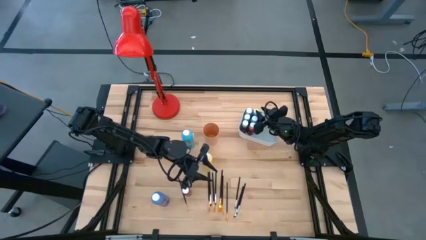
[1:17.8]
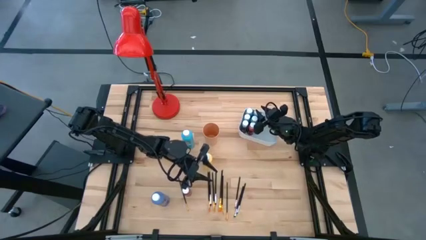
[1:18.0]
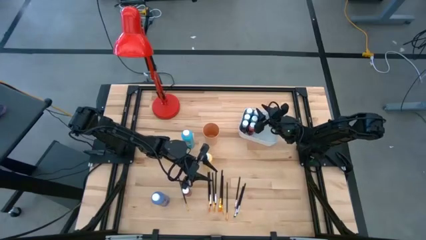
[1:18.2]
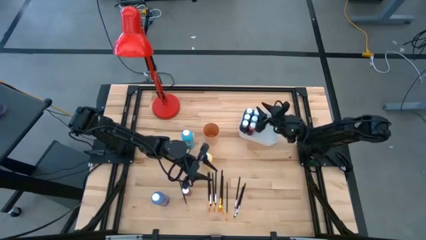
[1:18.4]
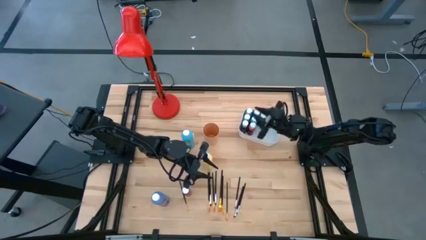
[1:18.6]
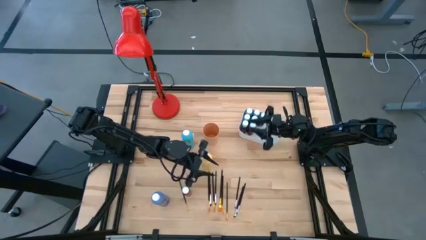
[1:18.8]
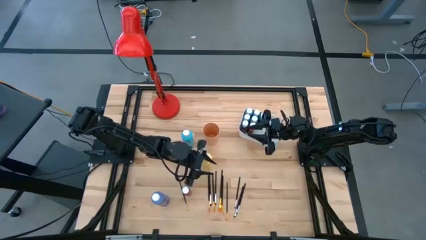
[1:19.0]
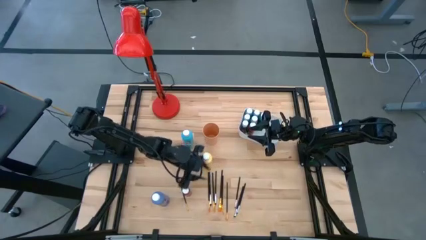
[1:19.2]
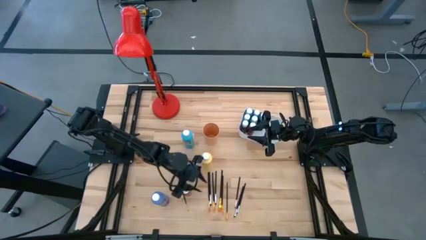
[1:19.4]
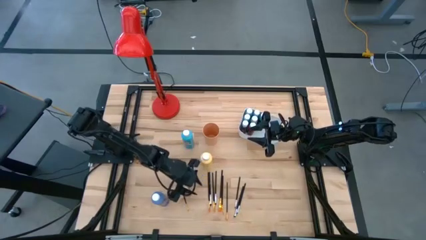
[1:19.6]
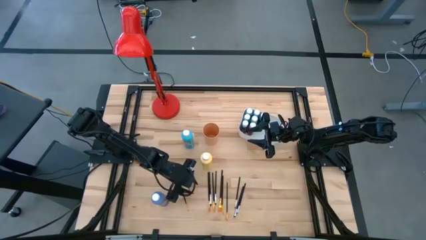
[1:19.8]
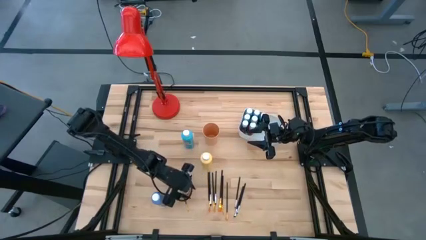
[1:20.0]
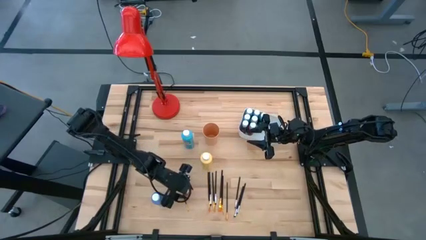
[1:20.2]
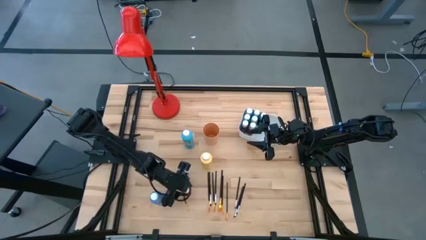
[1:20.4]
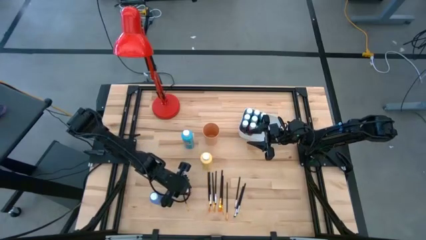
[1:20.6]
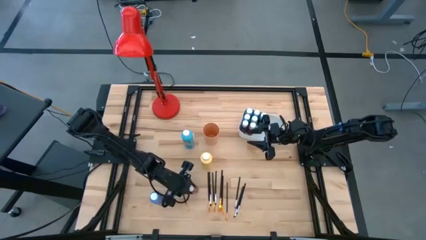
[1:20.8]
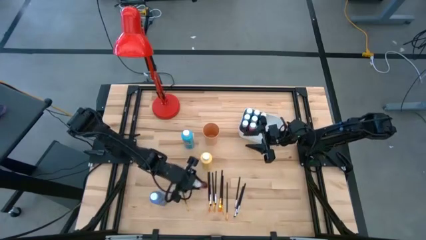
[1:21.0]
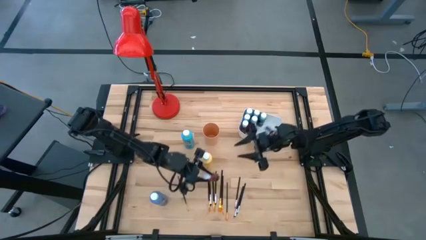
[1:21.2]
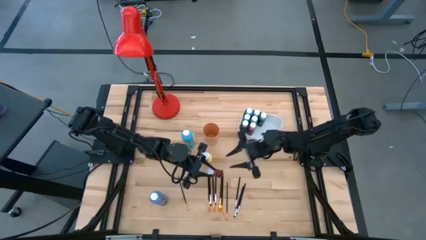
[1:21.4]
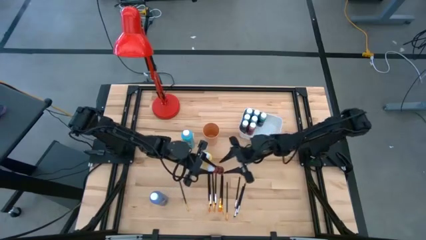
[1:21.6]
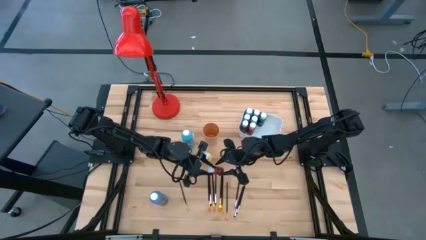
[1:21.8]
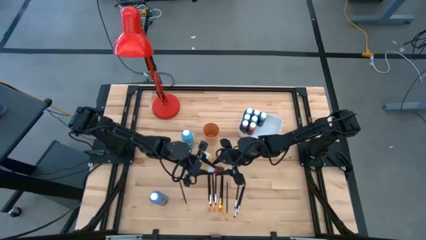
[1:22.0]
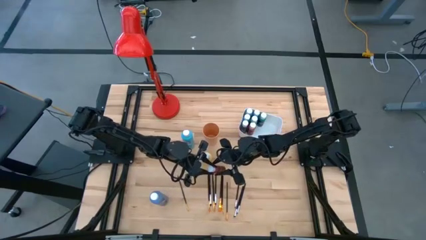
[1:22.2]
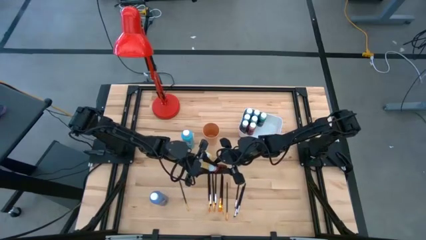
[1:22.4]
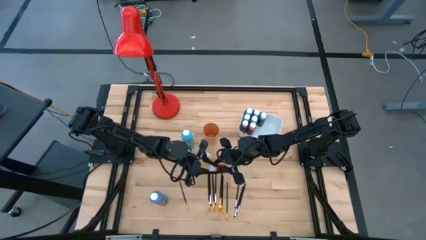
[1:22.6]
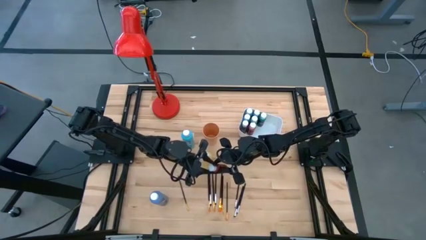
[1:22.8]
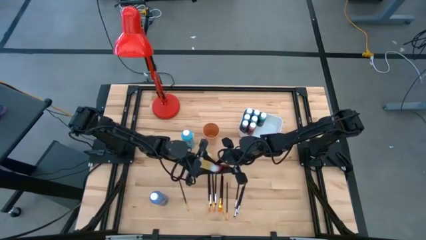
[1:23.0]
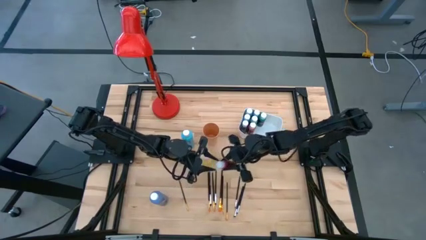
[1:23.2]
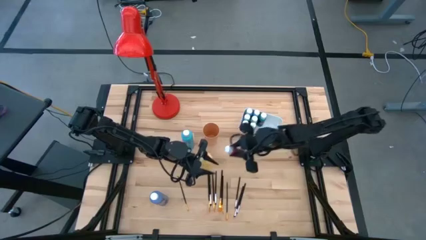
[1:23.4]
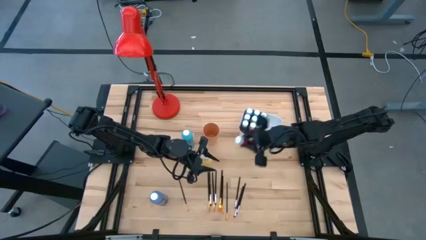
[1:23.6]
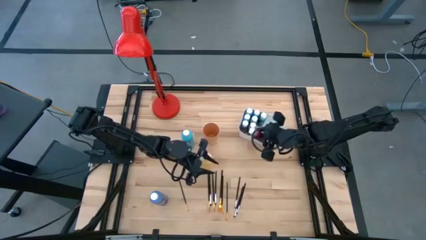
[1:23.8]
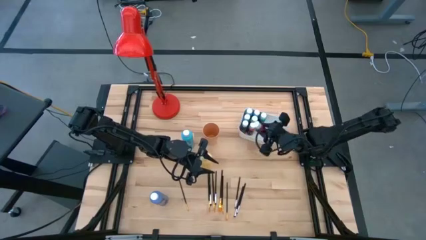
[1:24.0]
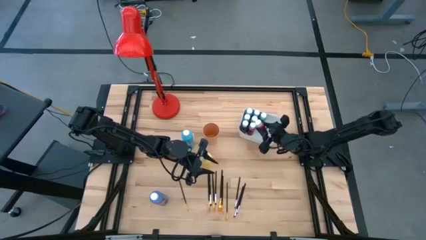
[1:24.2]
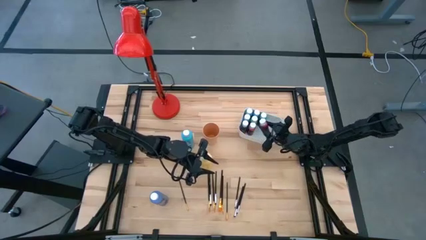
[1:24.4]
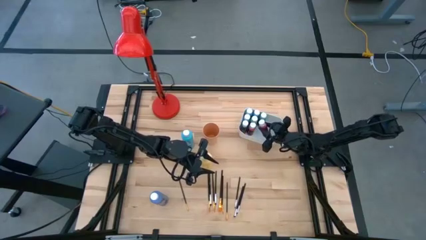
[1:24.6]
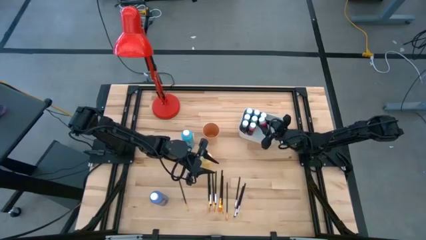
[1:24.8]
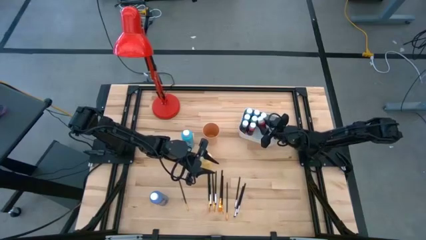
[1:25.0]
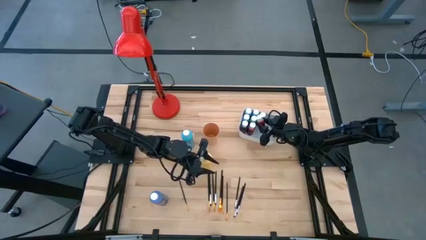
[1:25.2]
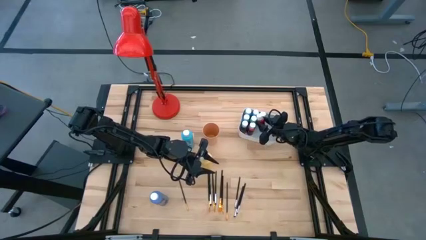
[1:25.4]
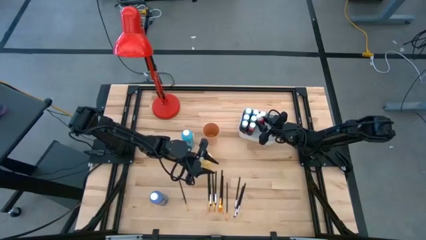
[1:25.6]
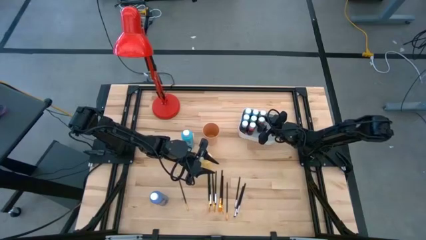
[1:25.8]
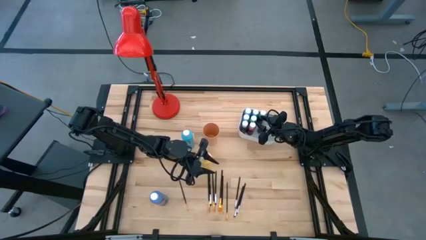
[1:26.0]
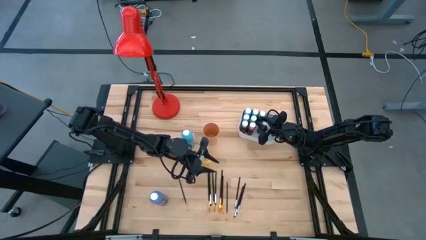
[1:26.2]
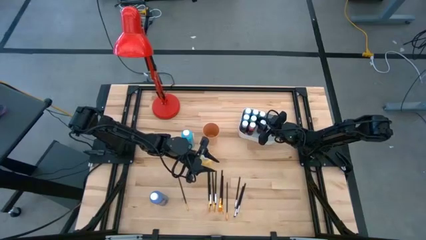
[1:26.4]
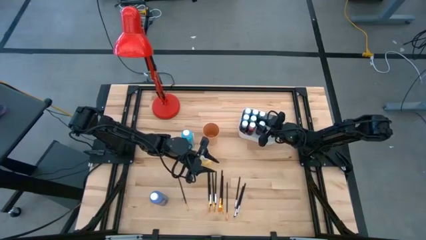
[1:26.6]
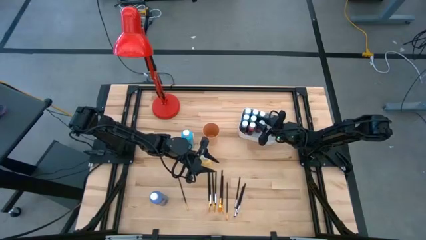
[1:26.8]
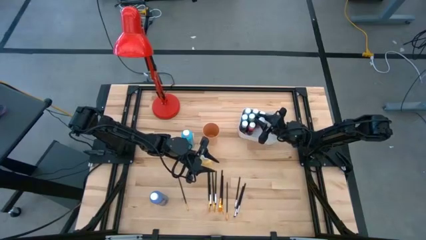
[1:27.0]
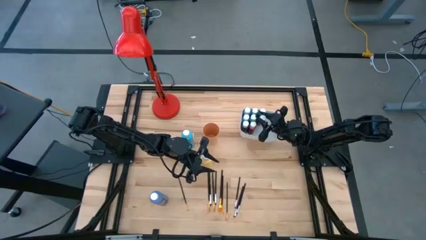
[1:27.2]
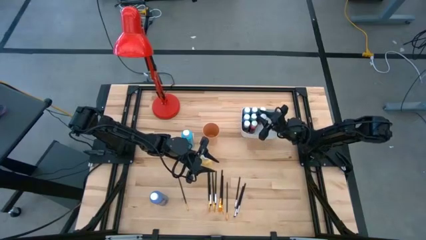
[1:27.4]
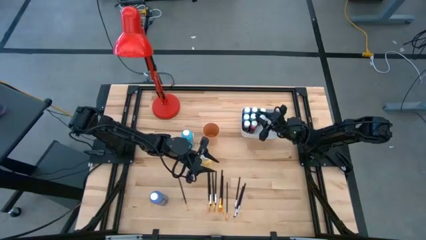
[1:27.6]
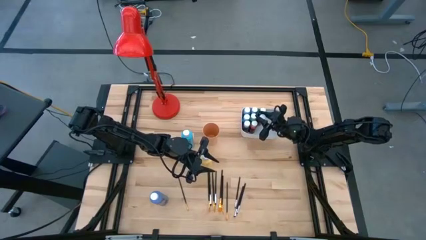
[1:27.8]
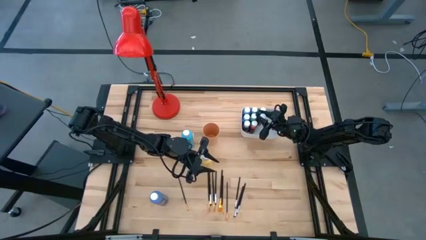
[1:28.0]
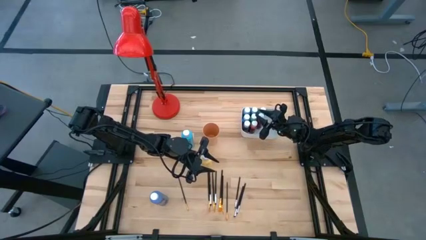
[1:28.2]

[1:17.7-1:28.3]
Task: Pick & Place Paint Supplies
Put the dark red paint bottle into the white bin

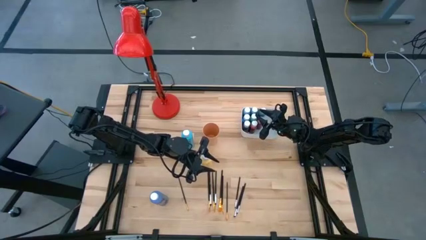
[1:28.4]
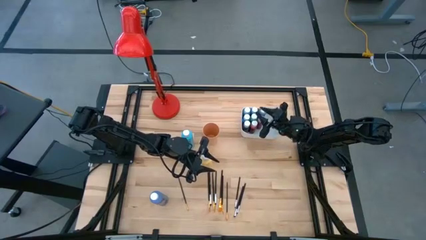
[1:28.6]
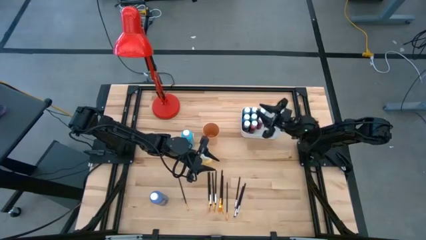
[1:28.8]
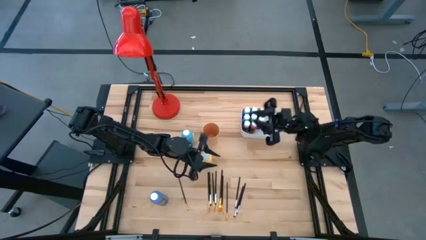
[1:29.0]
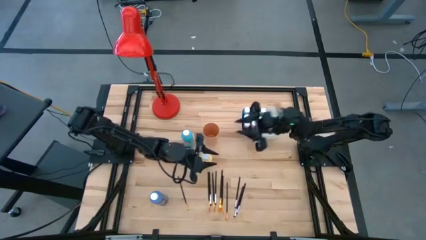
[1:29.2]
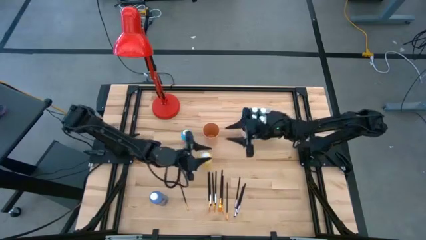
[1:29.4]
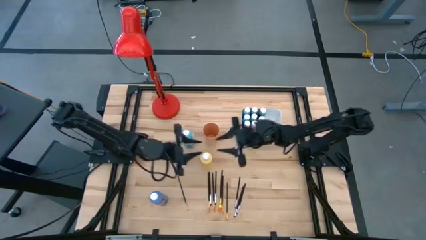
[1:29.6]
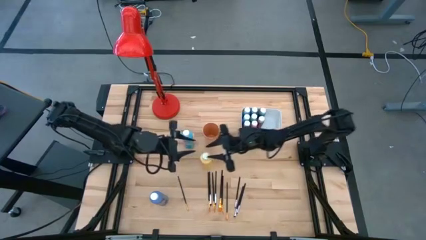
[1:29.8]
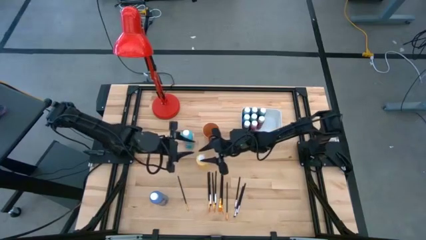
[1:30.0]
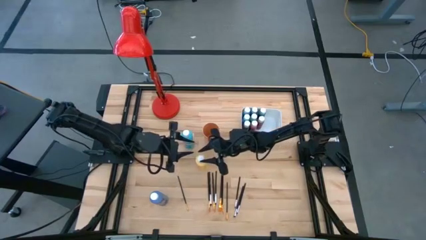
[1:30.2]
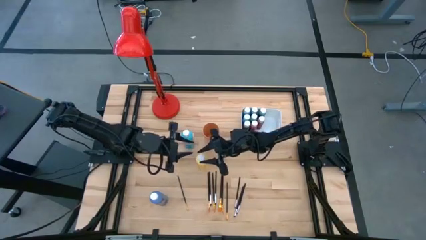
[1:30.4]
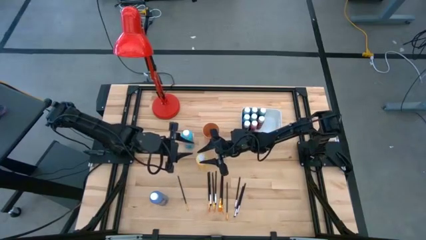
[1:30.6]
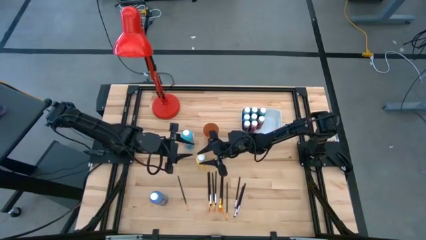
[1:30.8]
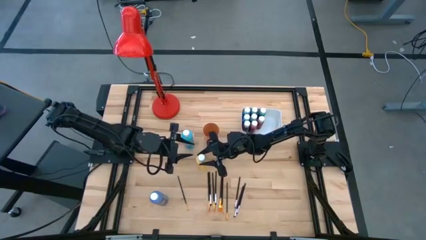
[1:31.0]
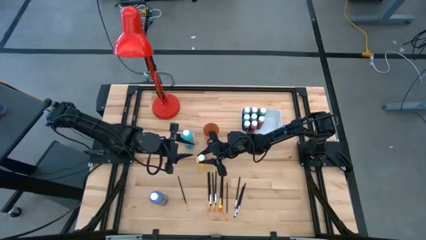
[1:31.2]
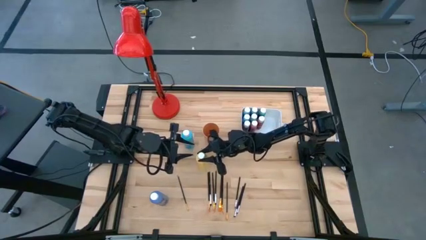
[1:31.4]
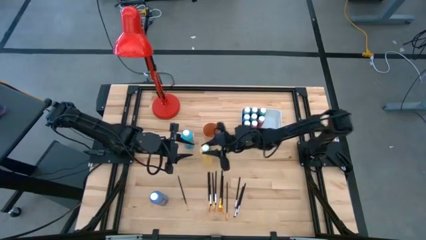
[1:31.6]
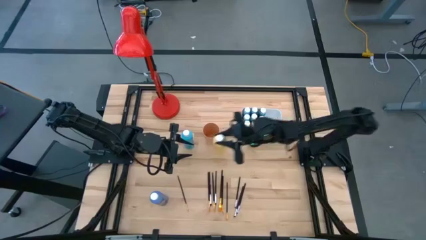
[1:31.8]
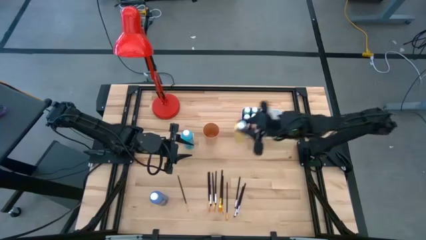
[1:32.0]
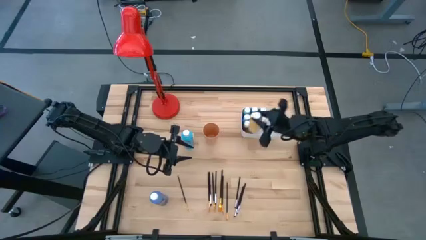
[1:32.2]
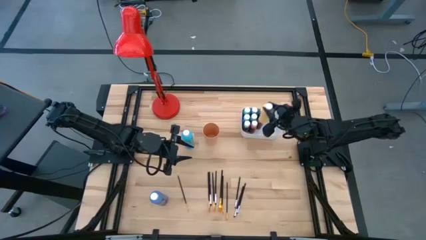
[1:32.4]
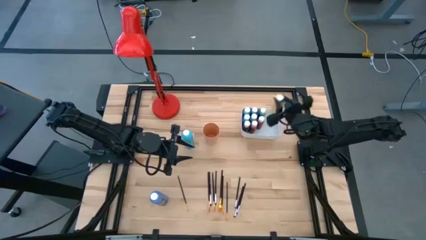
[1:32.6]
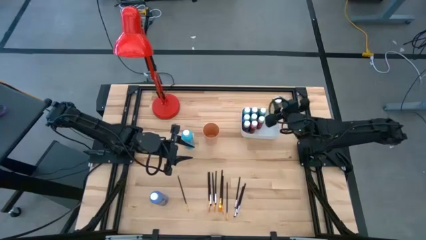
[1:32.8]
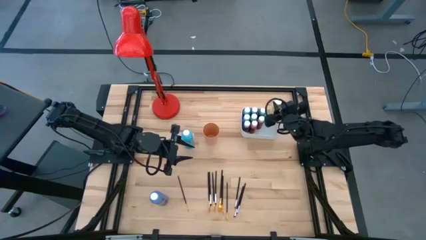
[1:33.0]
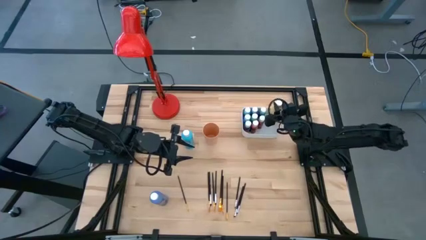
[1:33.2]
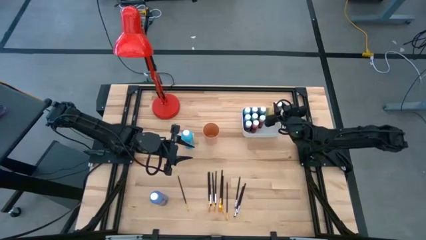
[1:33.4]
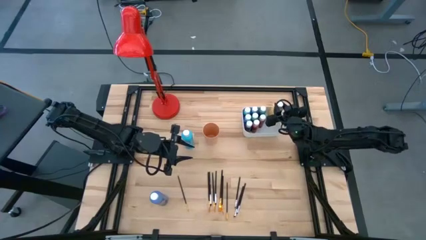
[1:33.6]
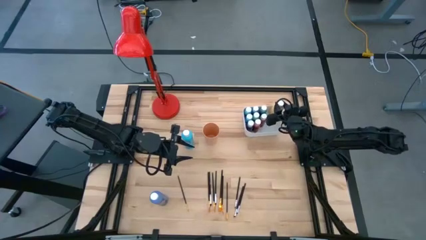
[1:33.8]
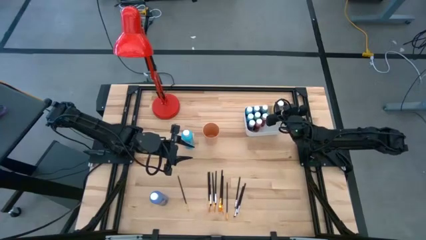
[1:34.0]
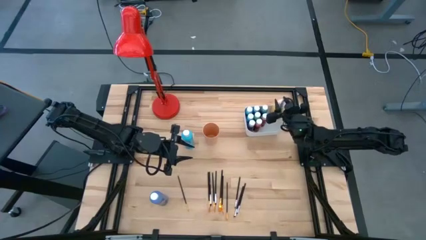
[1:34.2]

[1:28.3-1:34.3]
Put the yellow paint bottle into the white bin
